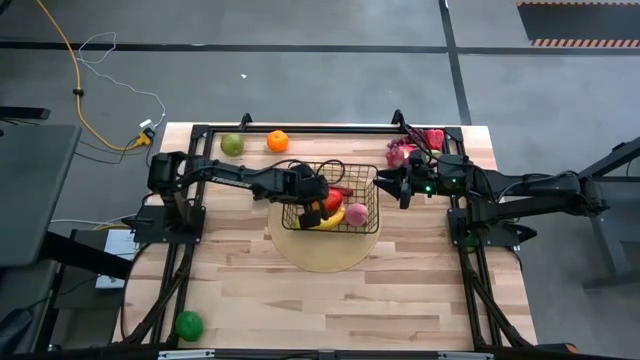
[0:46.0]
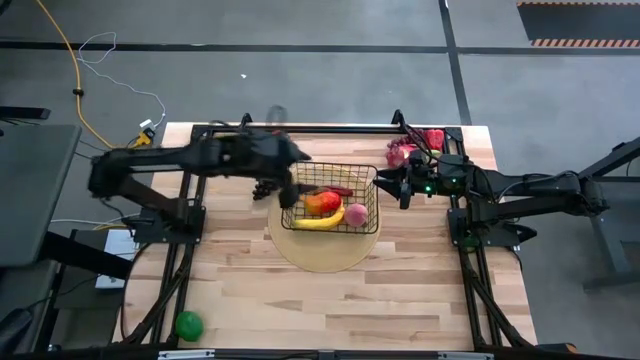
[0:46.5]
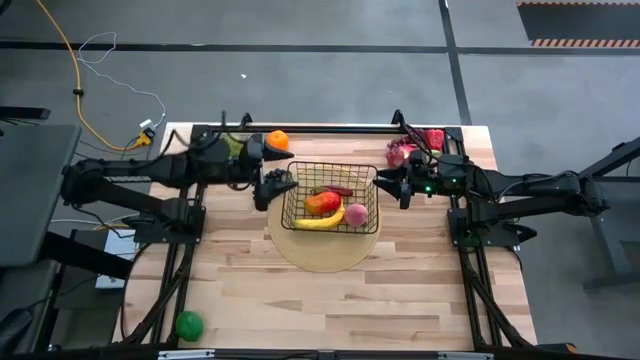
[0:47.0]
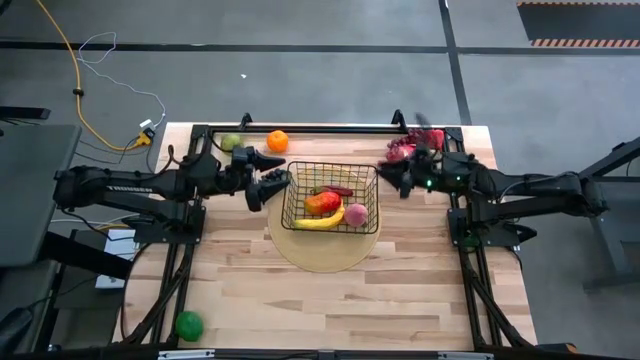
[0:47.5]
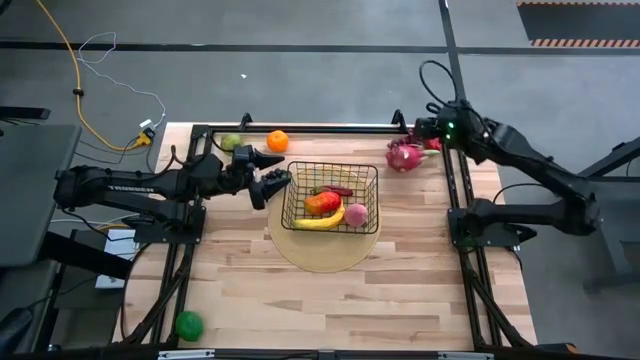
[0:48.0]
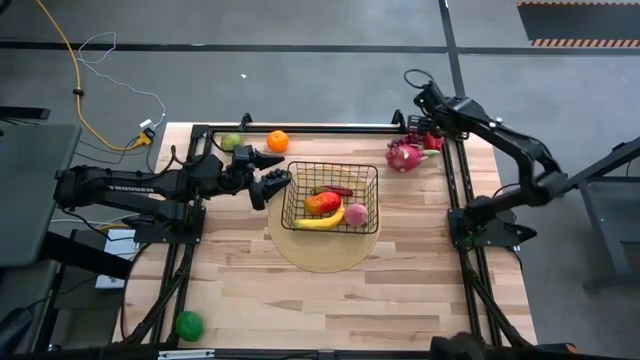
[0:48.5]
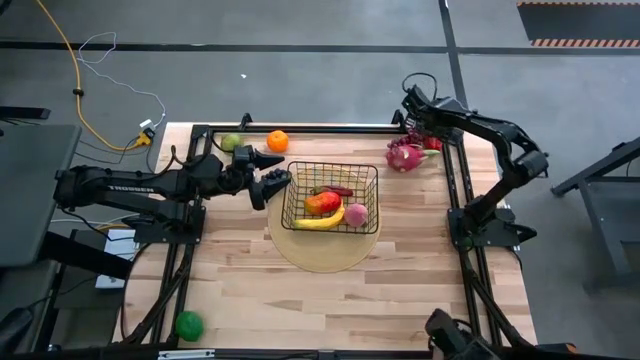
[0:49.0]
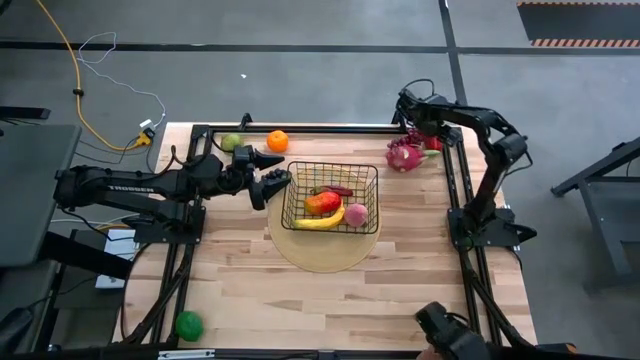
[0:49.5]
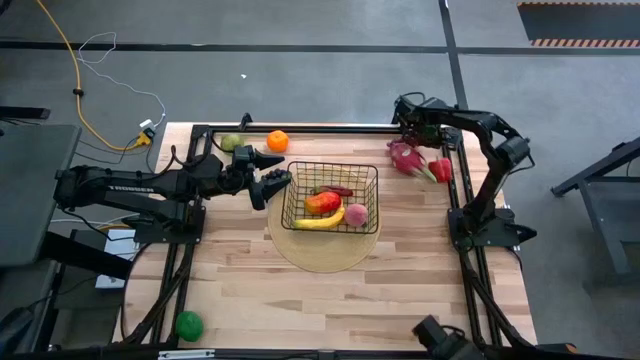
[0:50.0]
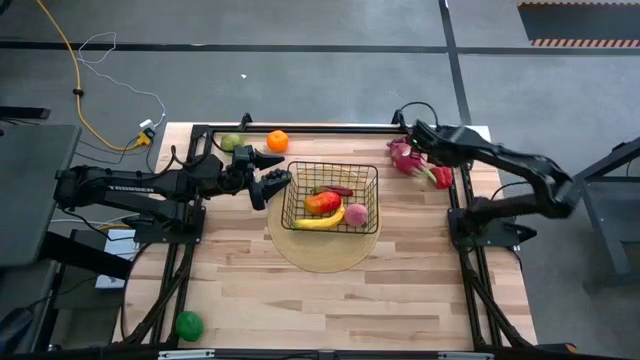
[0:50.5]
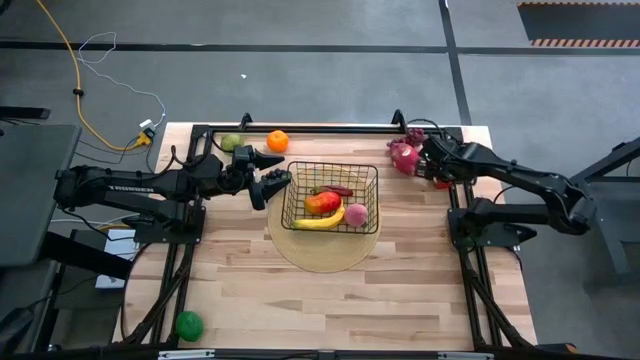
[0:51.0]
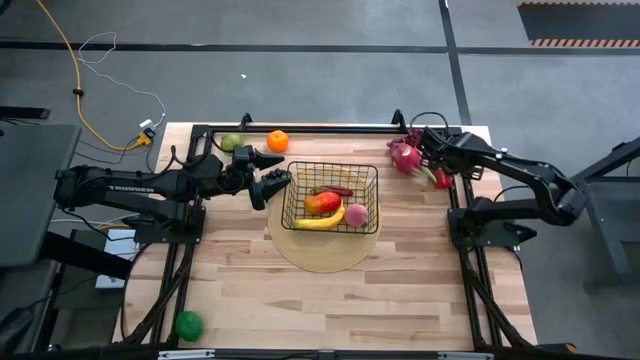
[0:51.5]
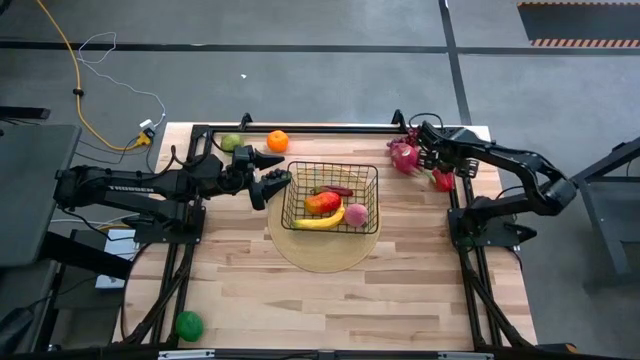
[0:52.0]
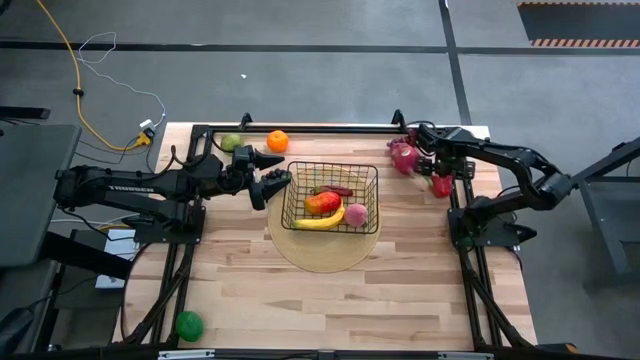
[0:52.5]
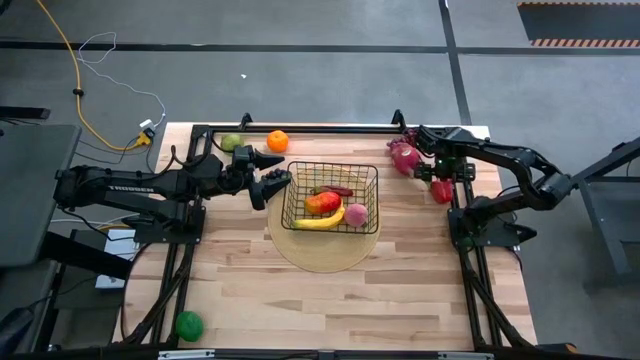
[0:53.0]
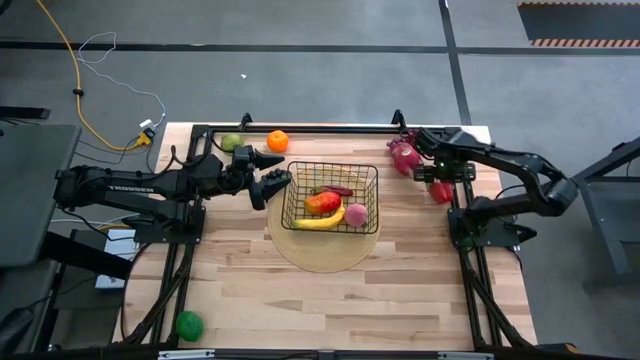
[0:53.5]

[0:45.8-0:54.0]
Task: Build produce basket
Put the bell pepper into the wire basket

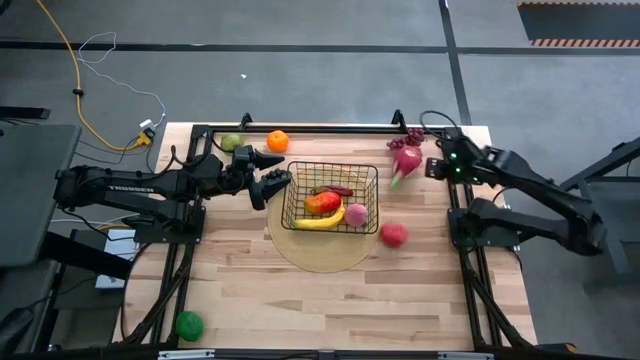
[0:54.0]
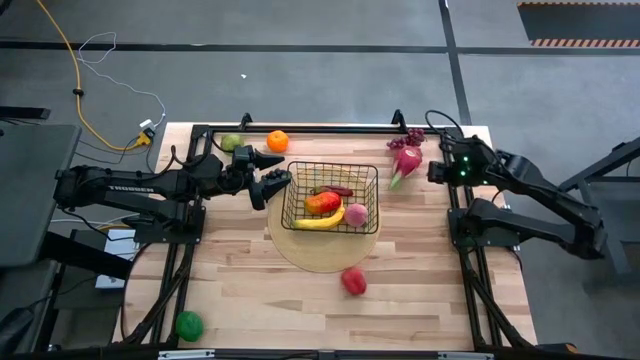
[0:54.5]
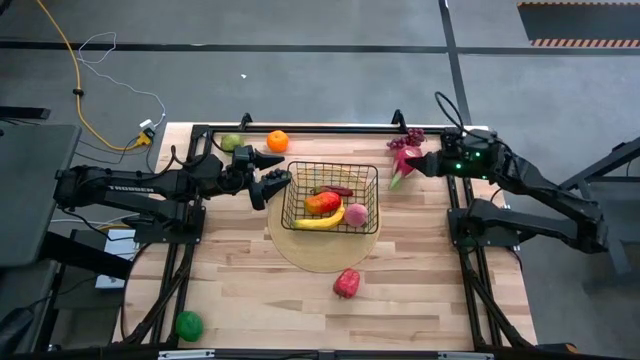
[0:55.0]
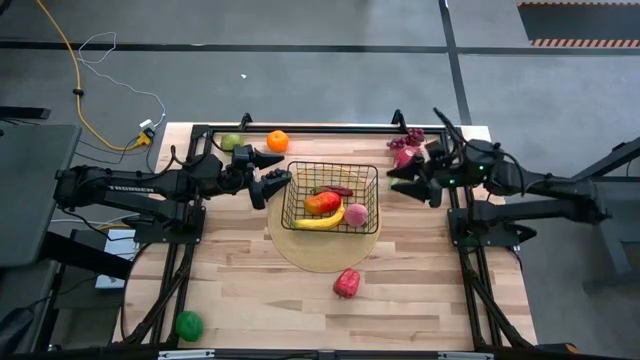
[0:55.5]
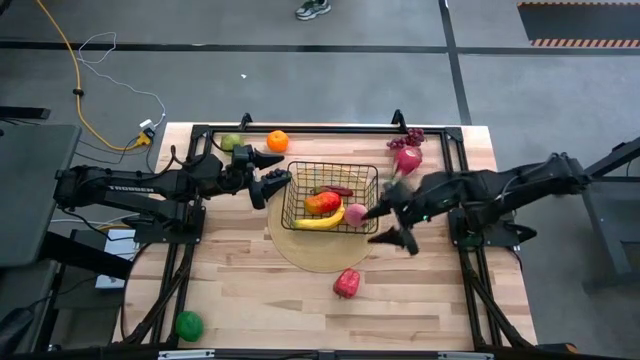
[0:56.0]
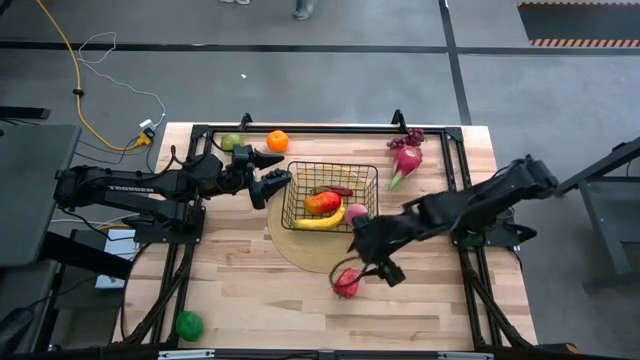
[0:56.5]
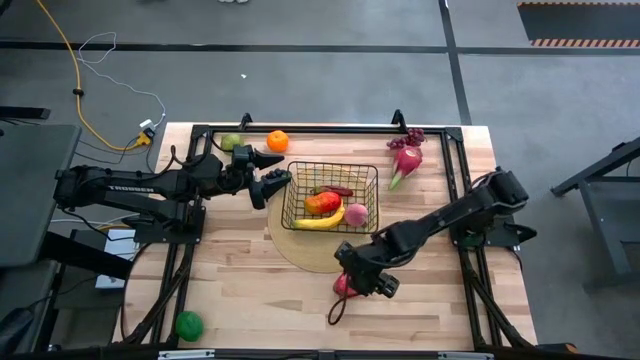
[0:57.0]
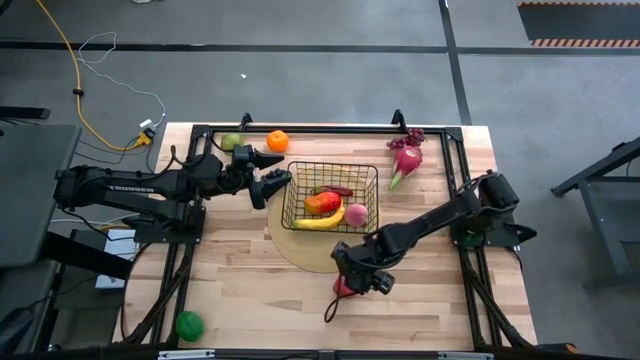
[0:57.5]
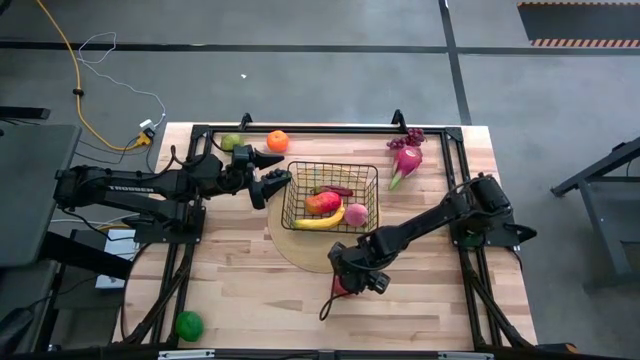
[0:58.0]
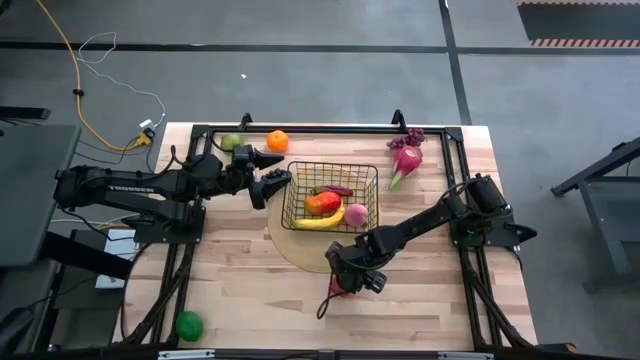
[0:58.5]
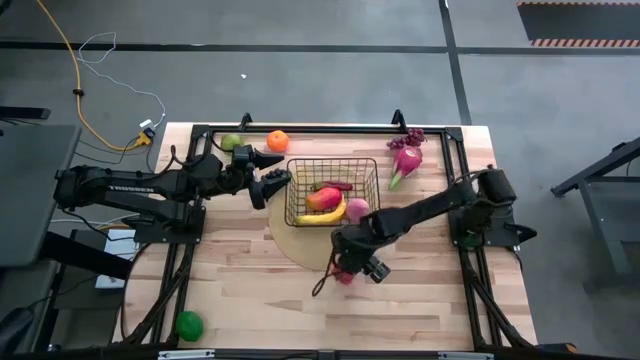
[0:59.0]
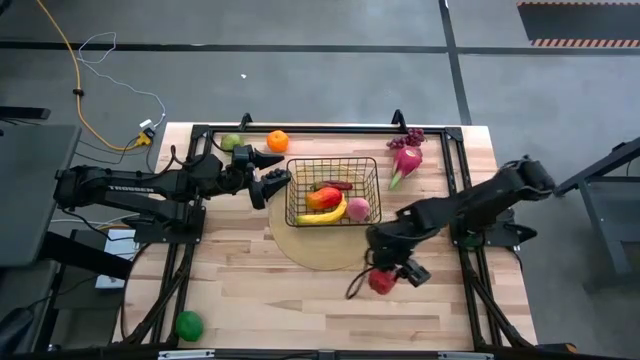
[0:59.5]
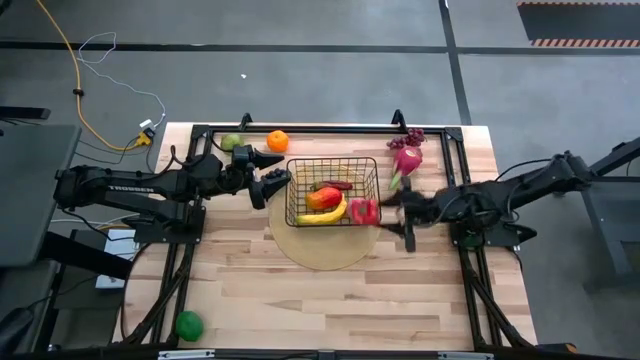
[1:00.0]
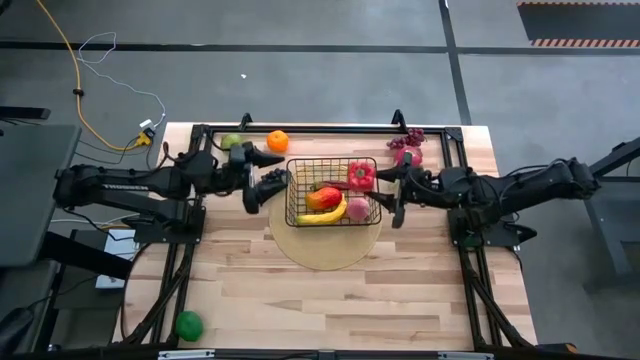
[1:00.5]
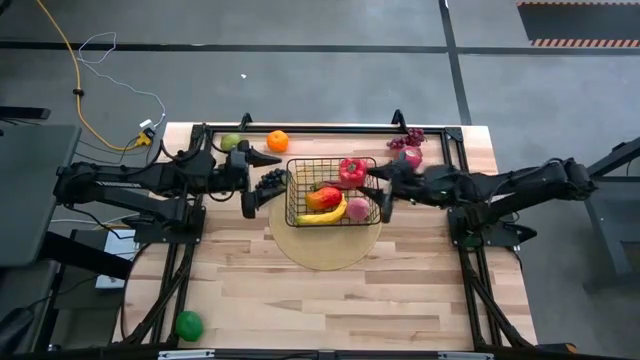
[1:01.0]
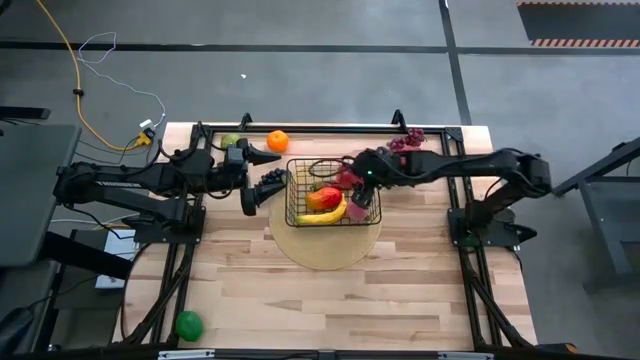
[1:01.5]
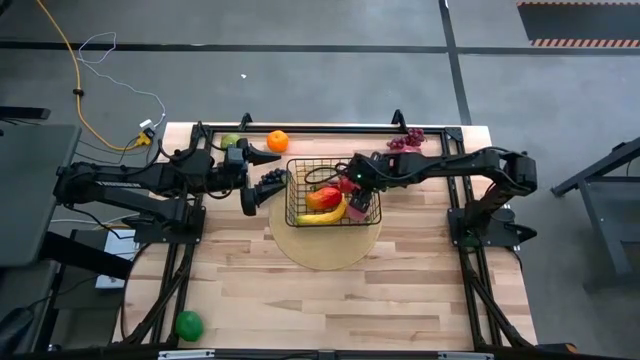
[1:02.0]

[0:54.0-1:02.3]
Put the bell pepper into the wire basket

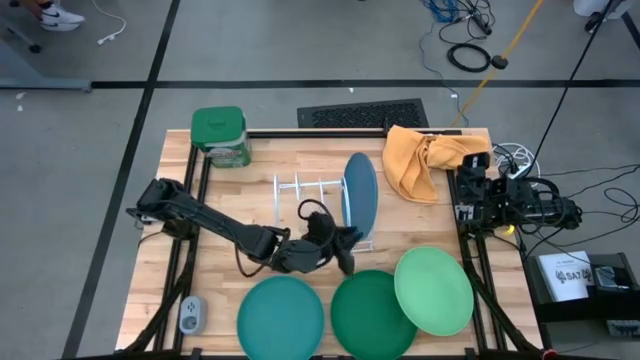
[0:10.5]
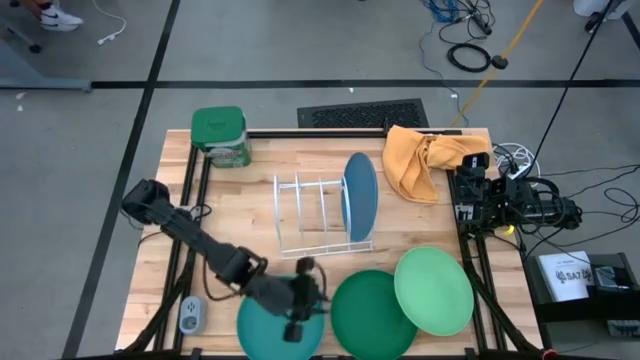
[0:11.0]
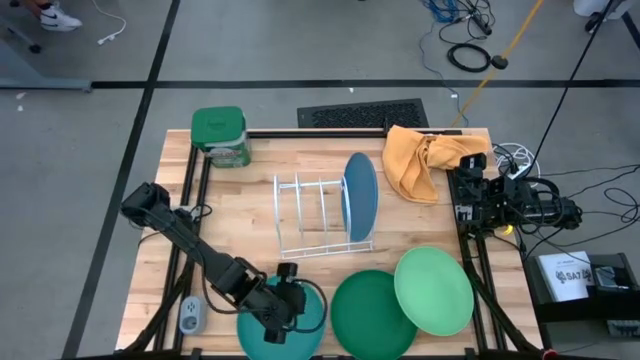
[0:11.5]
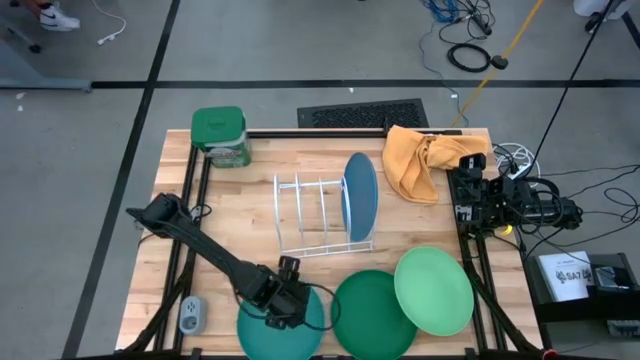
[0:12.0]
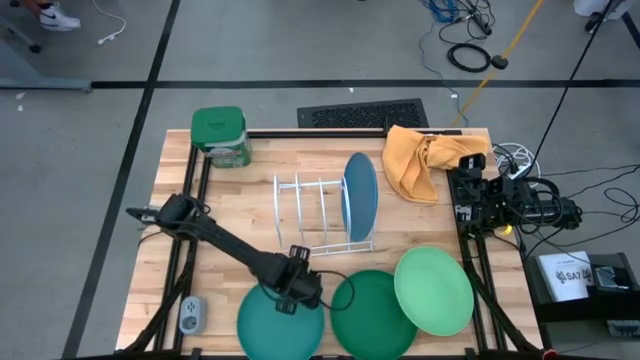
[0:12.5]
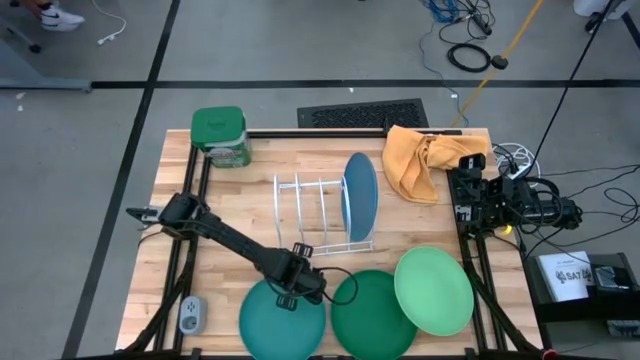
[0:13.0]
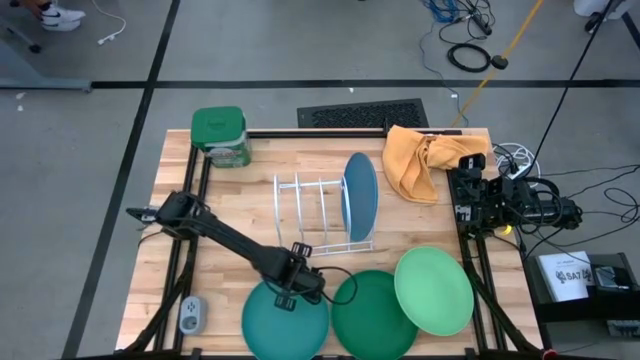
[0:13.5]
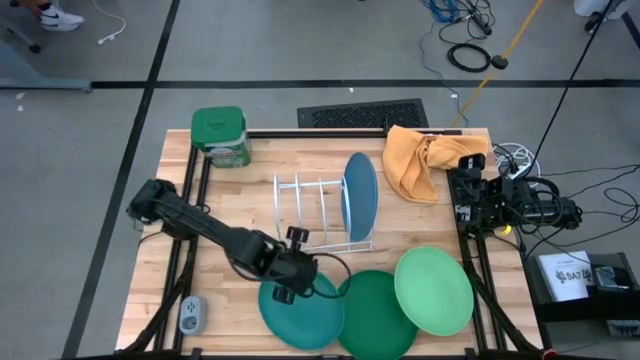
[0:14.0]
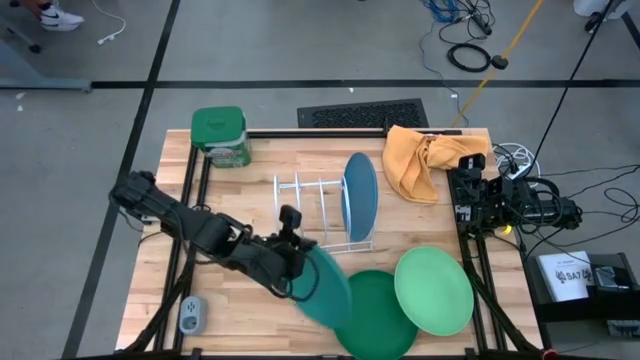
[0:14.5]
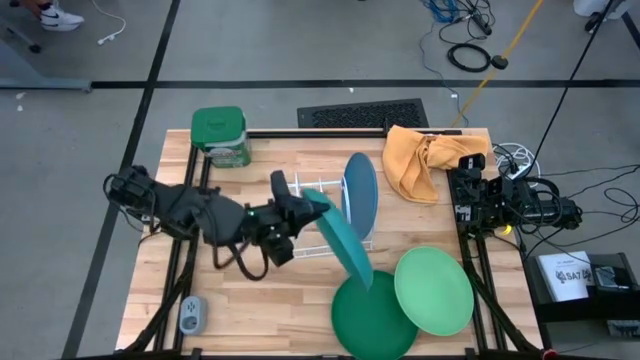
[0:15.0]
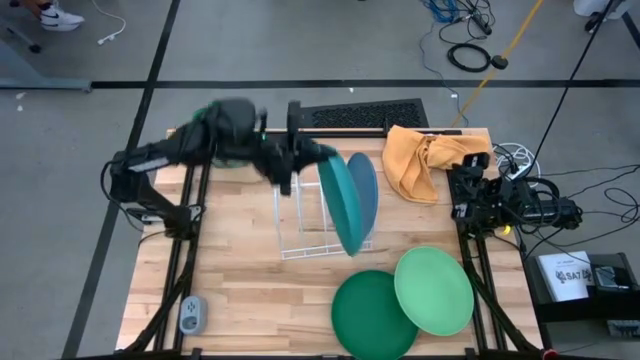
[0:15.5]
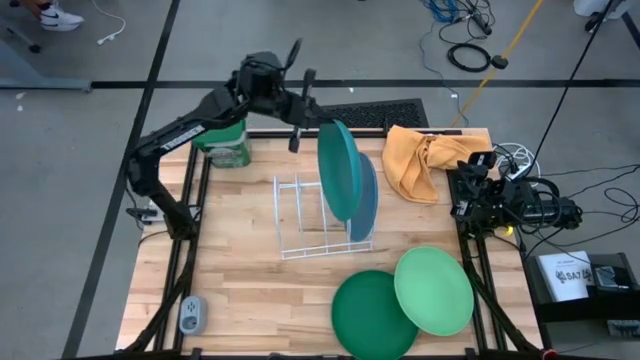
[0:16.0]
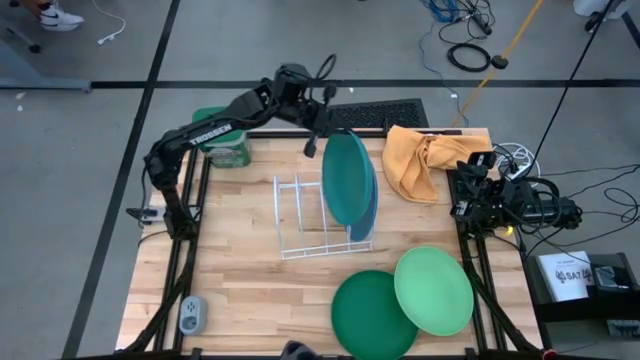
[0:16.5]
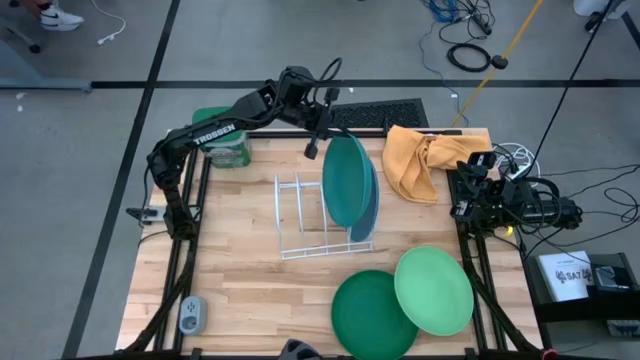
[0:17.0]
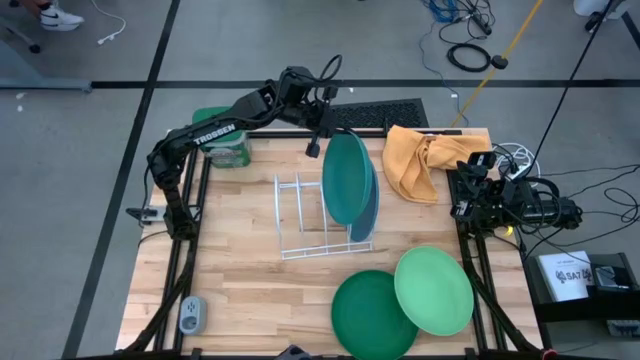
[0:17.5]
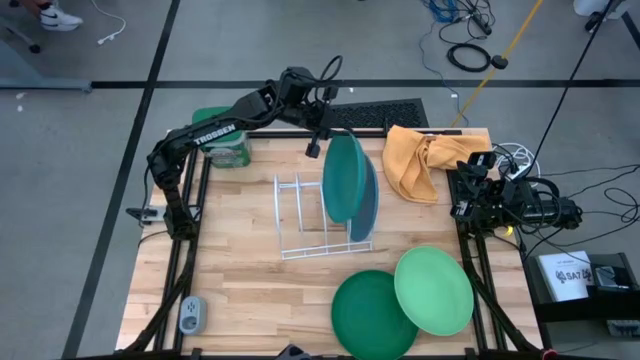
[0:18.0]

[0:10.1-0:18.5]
Task: Sort dishes
Put the light blue plate into the dish rack
